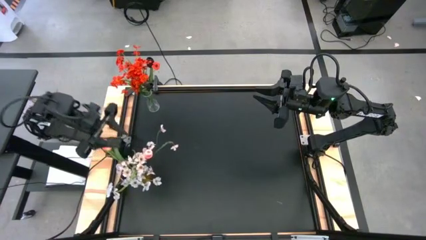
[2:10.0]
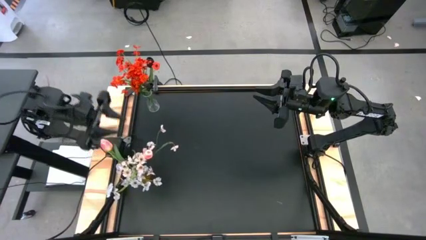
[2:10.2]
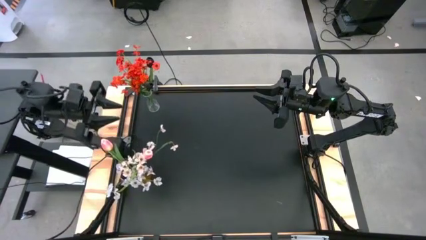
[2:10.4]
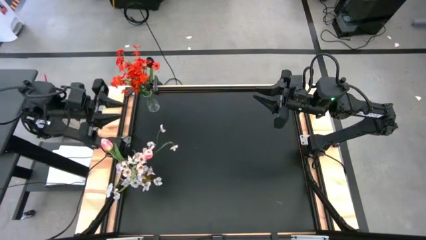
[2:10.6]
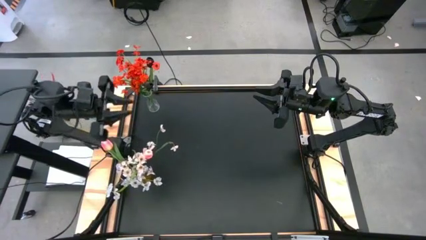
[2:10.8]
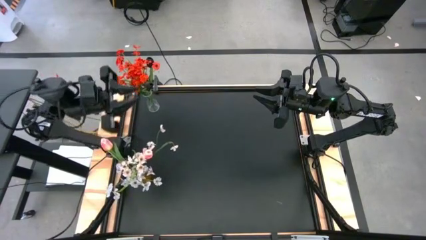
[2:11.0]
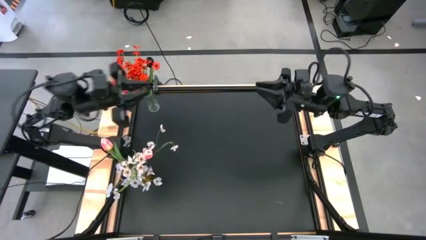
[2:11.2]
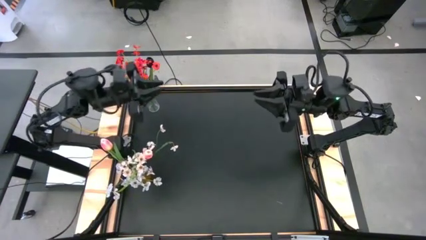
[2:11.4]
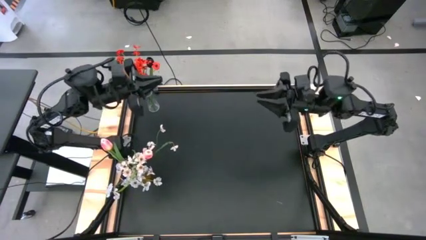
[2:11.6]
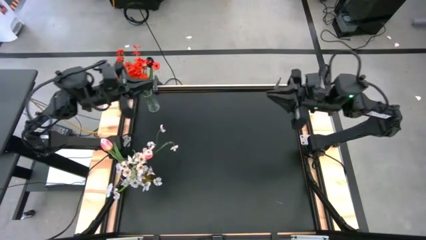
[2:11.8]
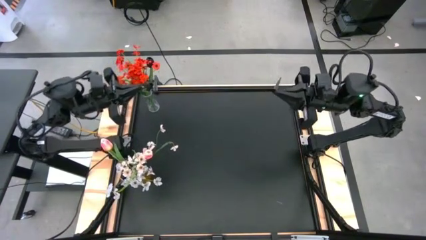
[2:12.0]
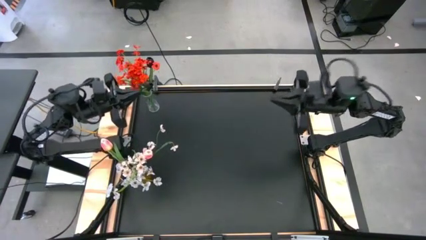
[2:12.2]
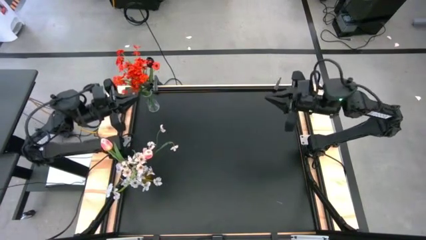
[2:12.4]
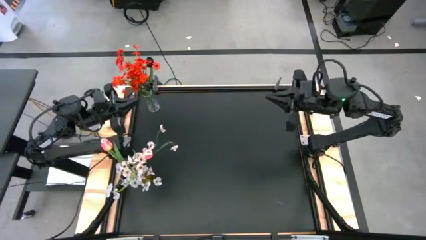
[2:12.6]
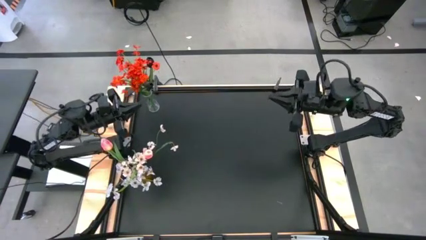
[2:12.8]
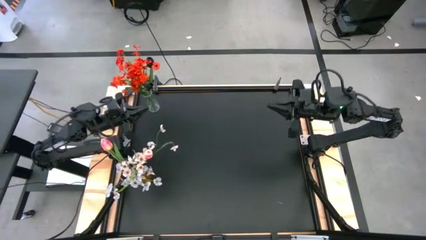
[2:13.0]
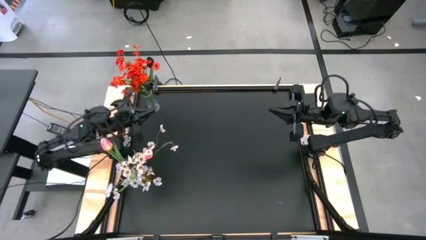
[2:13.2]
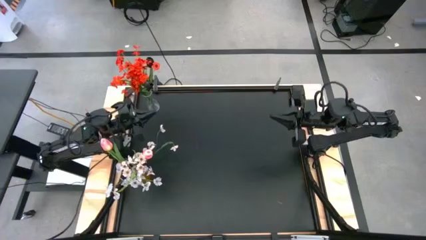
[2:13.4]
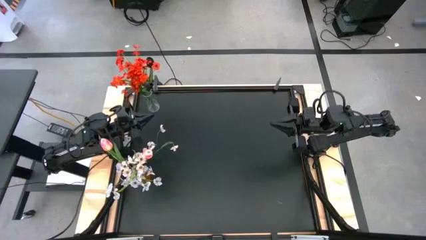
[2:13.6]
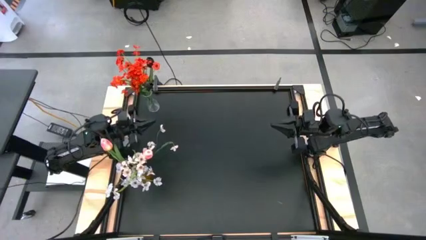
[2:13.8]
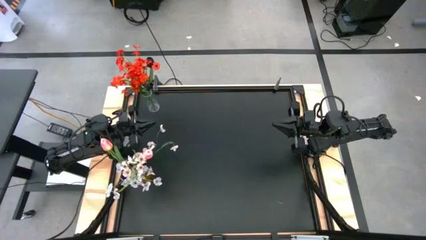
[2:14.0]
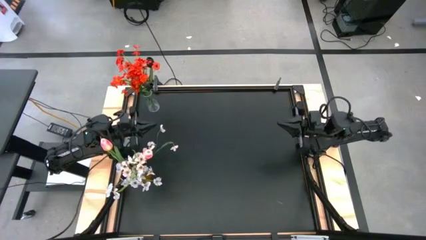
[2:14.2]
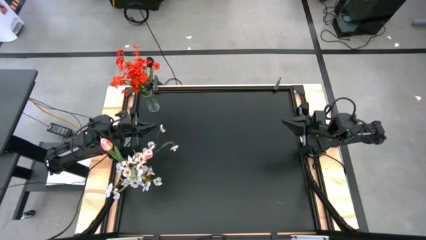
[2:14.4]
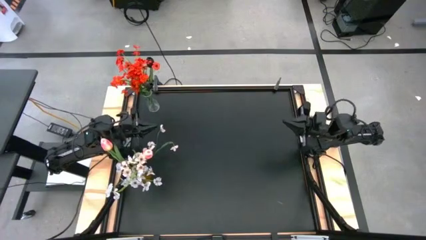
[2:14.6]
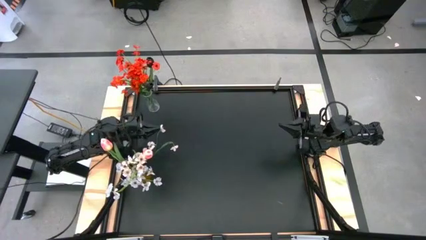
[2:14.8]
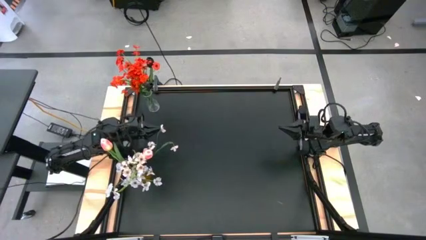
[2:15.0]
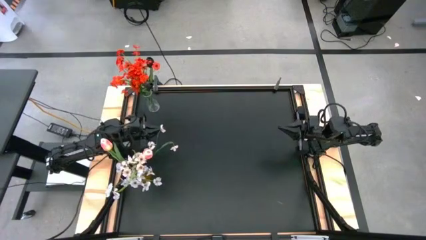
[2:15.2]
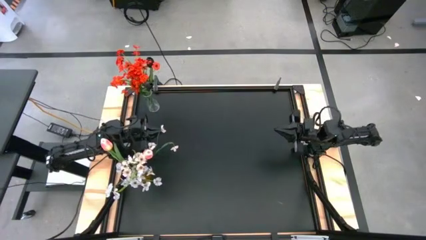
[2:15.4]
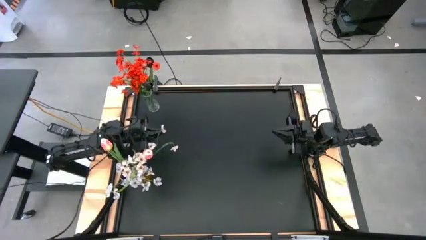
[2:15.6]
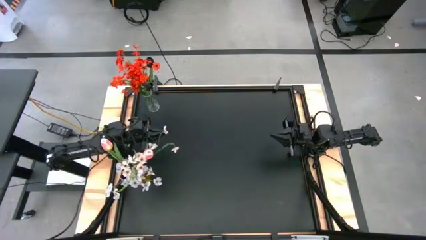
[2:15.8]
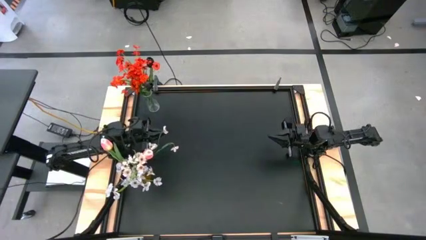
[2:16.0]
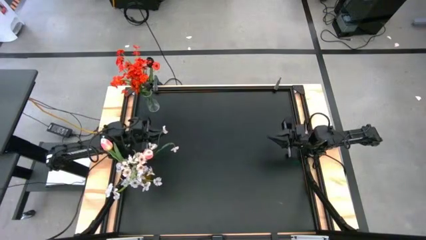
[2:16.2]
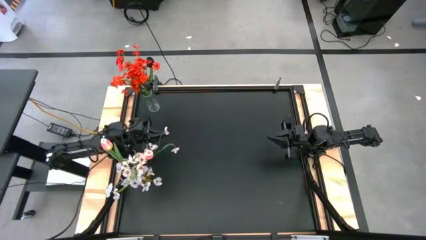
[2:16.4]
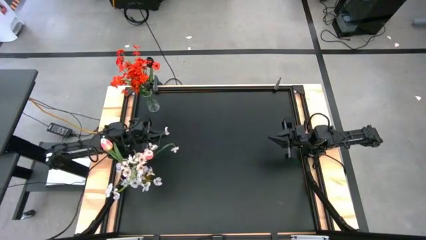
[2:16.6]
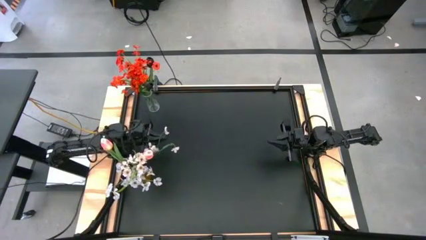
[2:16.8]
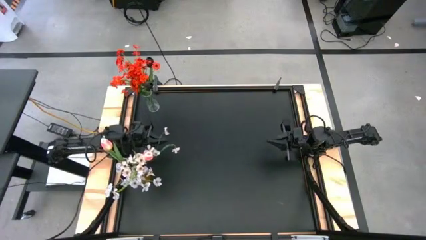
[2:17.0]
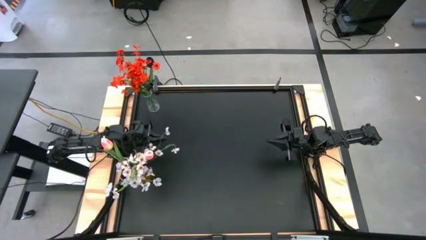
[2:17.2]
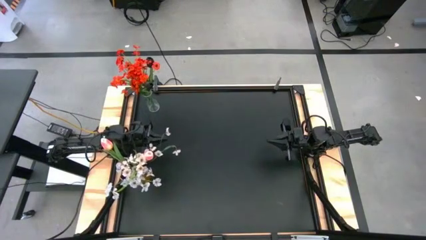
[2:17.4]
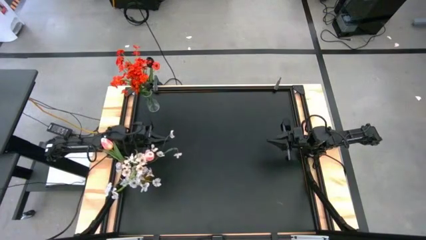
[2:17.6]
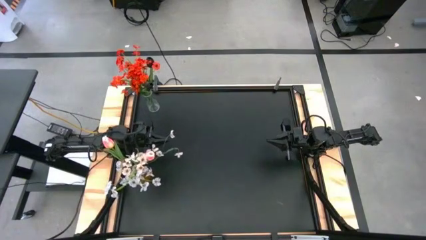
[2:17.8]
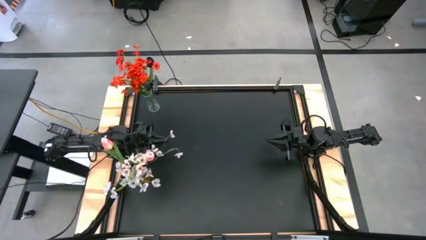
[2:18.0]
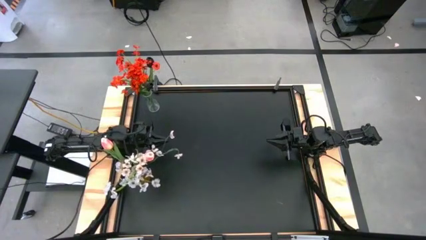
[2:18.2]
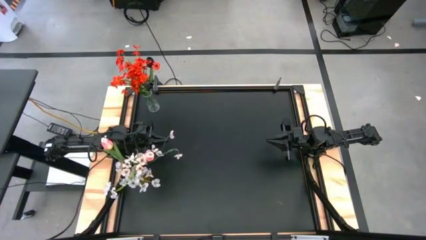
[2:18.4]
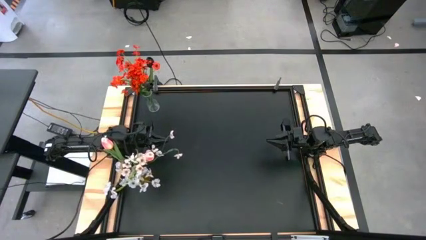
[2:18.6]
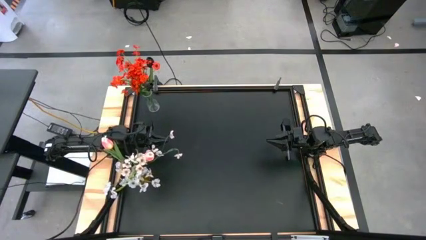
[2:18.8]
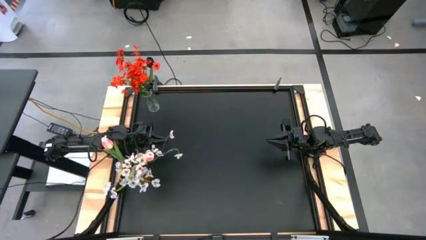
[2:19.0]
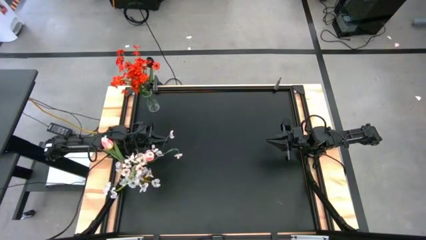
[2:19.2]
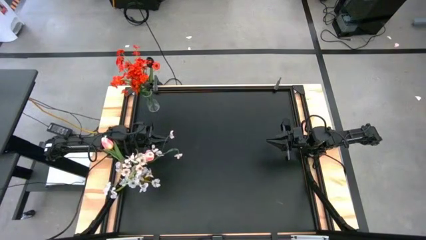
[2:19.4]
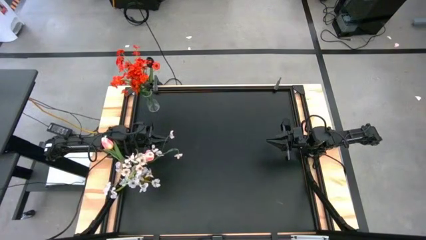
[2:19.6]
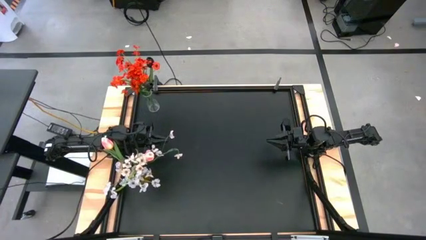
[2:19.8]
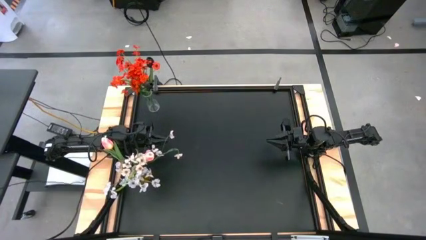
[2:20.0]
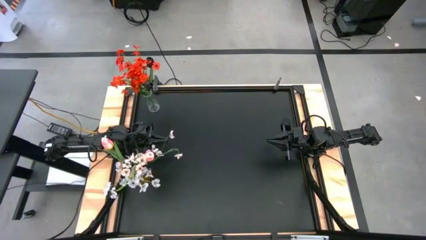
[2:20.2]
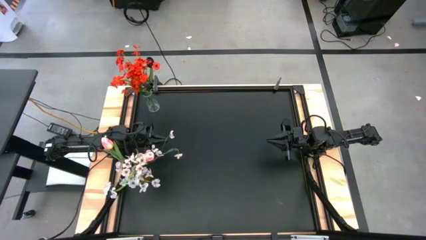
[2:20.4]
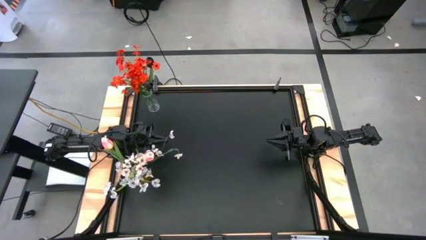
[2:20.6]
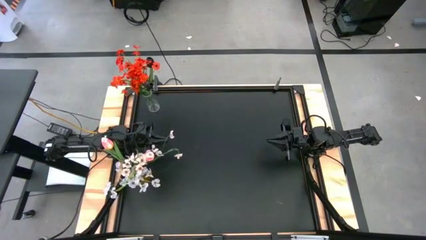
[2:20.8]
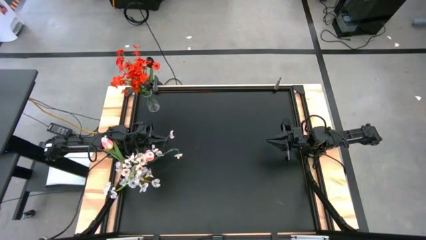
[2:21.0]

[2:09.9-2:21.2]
Task: Sort flowers into vase by color
Return to Home Position

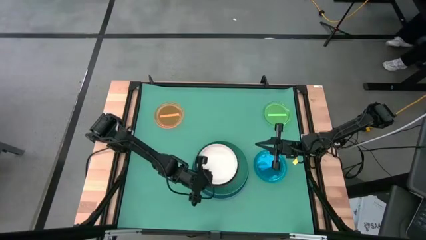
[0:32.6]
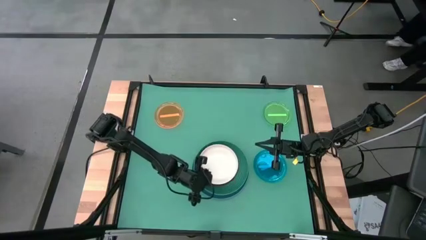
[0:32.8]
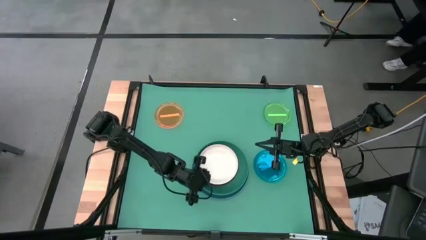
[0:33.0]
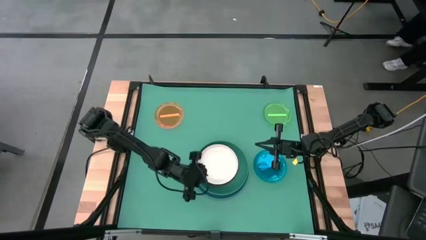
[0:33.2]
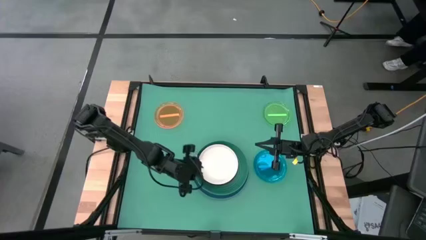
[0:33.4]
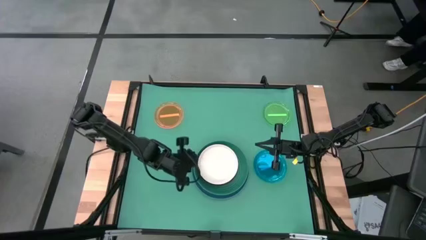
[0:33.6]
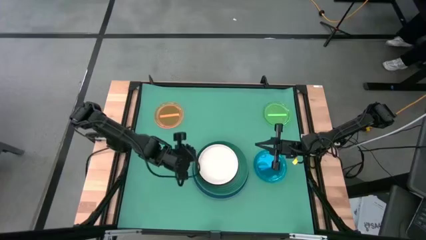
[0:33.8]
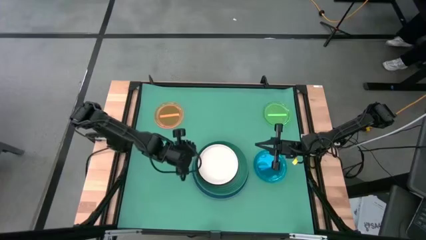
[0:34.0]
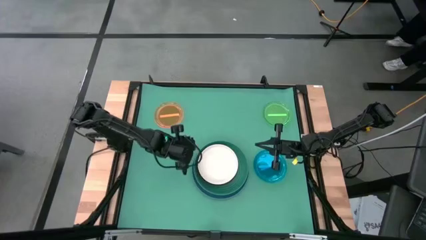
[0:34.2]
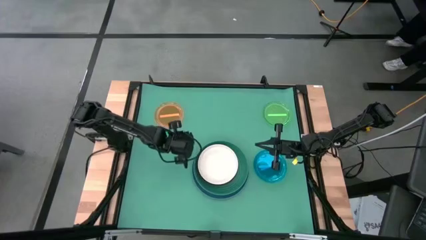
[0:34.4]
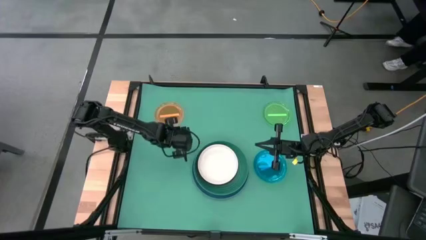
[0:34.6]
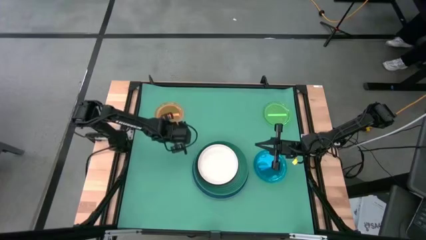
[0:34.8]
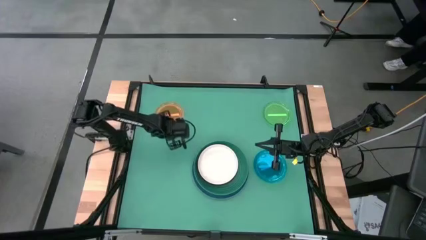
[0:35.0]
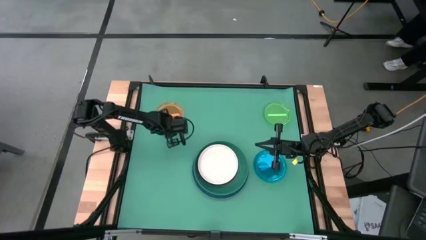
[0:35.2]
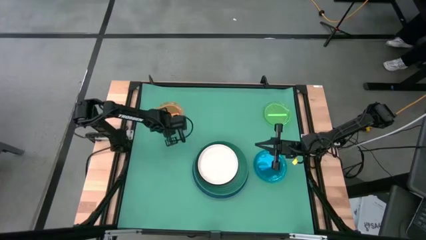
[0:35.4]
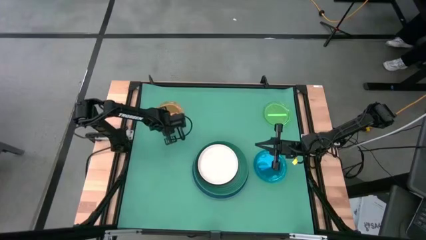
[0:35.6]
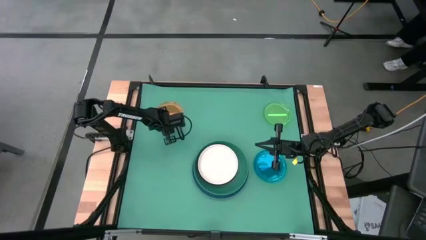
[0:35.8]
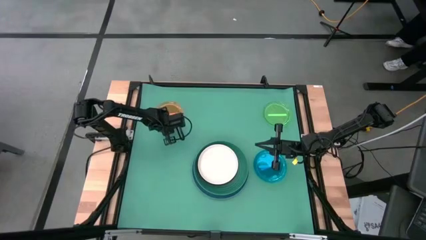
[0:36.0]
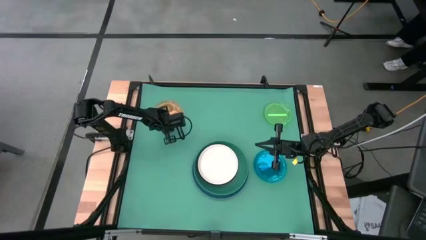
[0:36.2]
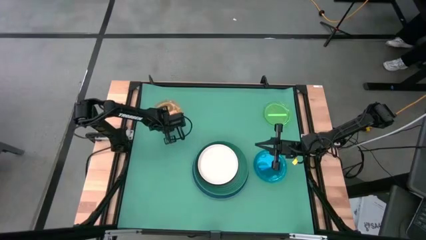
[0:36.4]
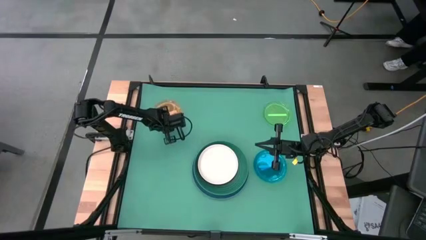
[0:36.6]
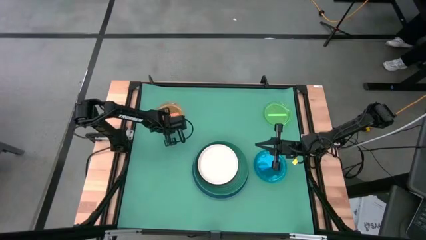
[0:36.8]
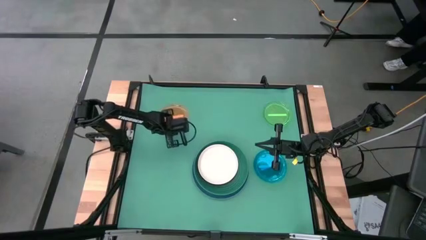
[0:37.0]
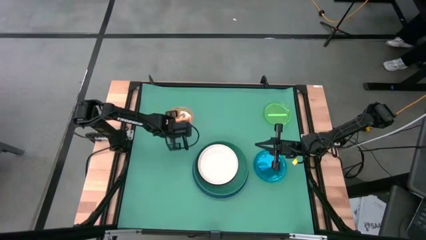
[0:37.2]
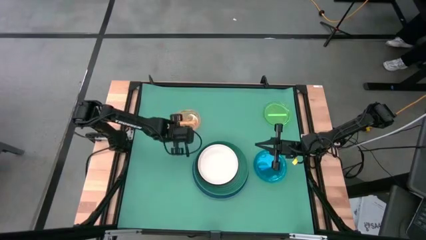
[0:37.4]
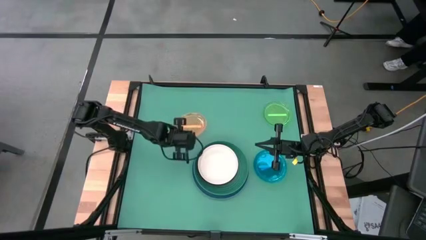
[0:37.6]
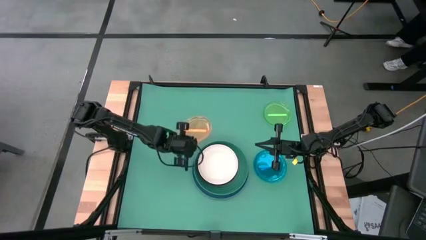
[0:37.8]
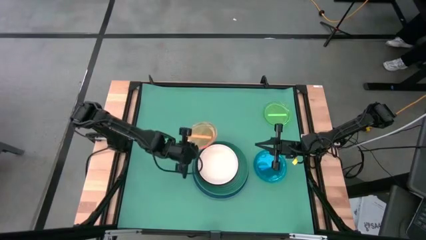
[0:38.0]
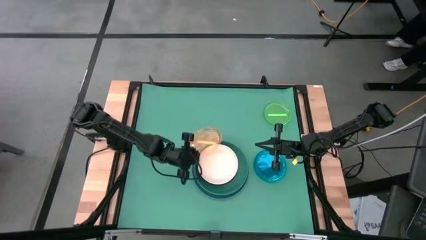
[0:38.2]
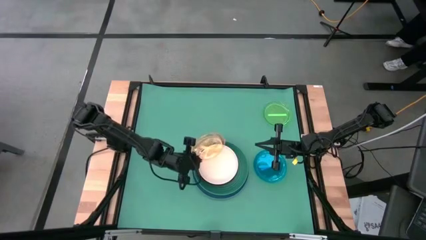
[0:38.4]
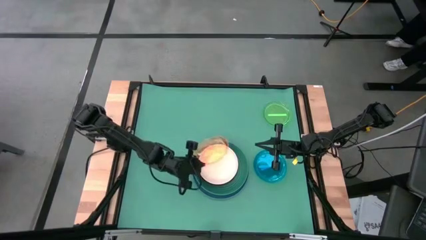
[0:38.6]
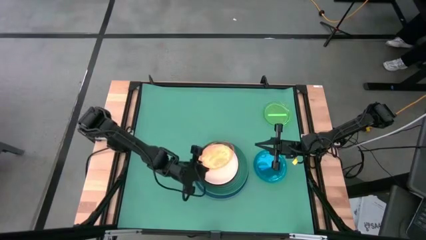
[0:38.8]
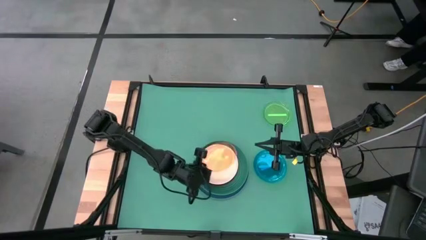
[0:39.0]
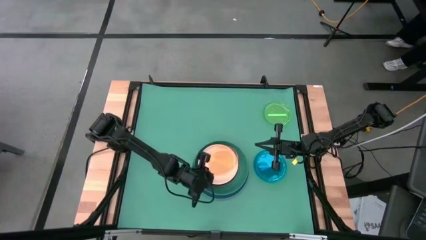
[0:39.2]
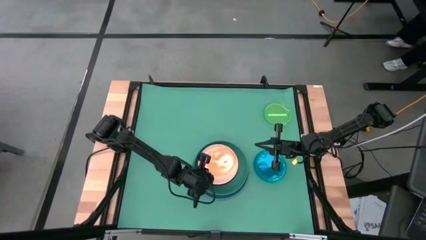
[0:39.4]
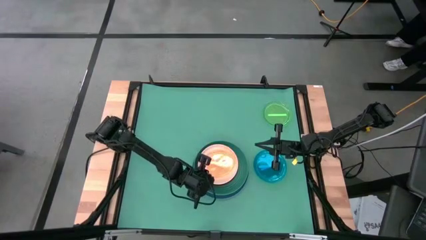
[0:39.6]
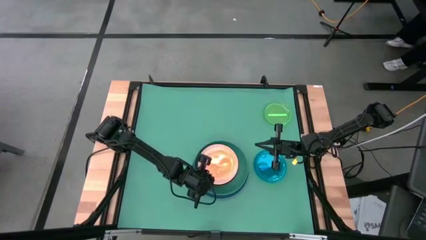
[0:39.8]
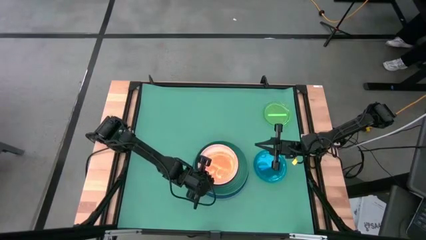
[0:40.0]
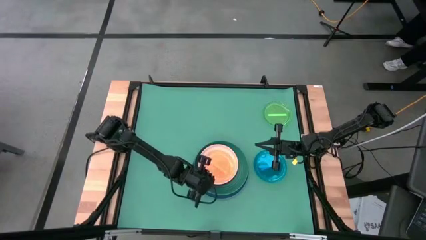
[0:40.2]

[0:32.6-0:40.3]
Task: Stack plastic plates
Stack the transparent orange plate on top of the white plate
